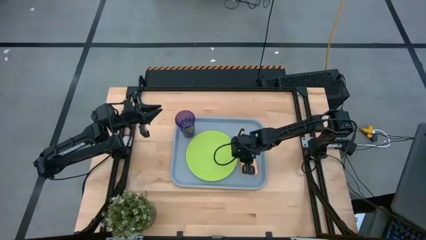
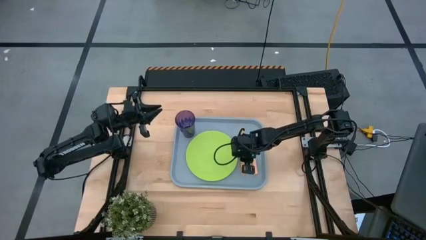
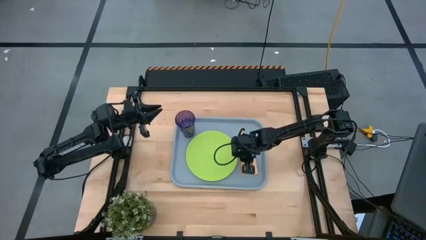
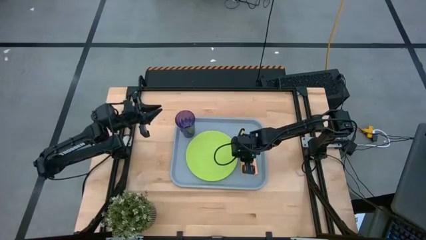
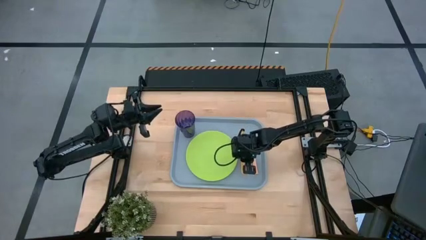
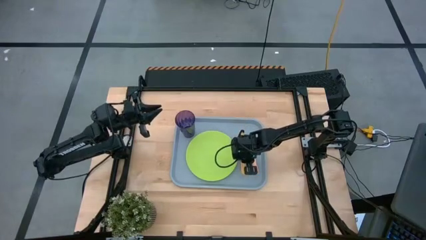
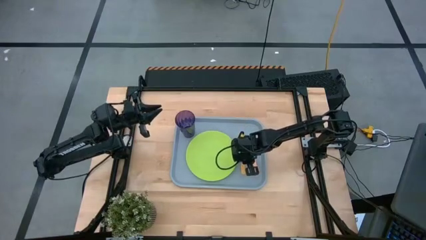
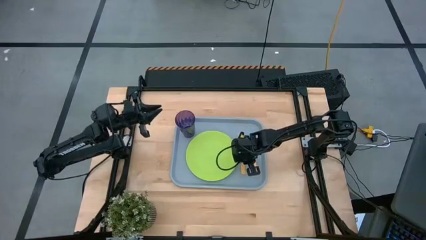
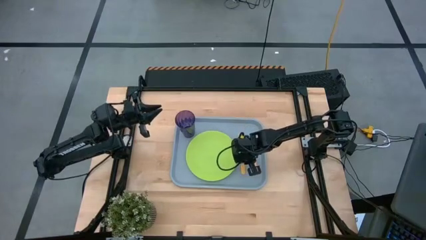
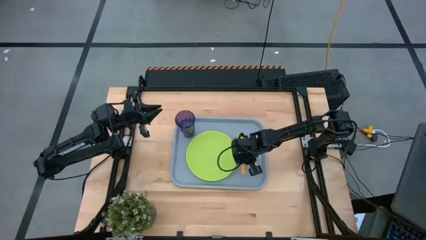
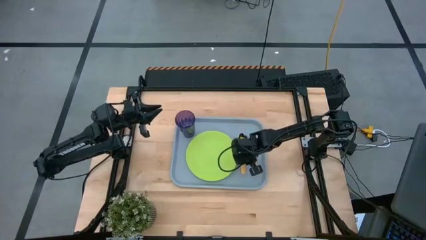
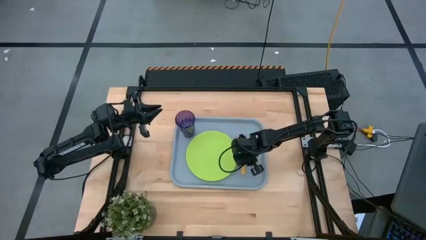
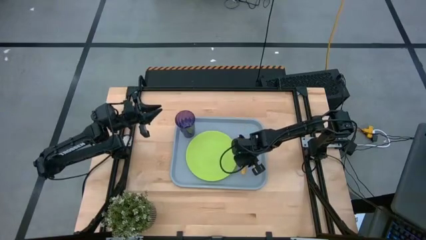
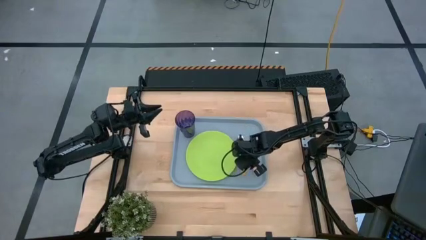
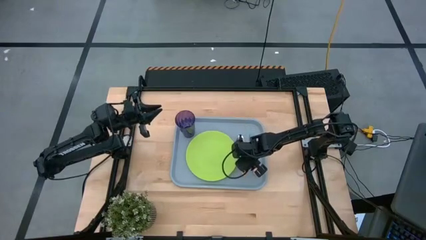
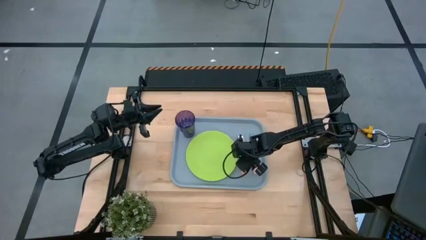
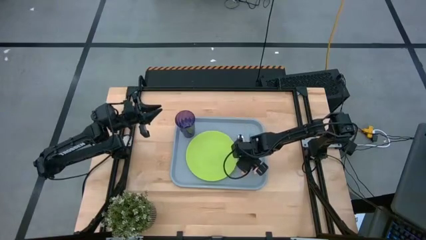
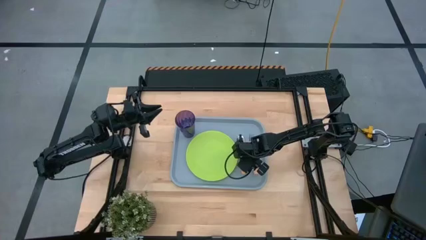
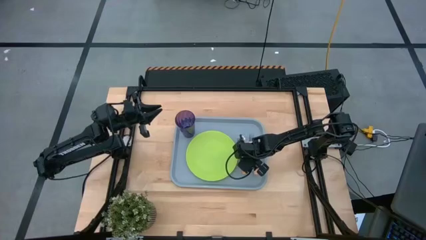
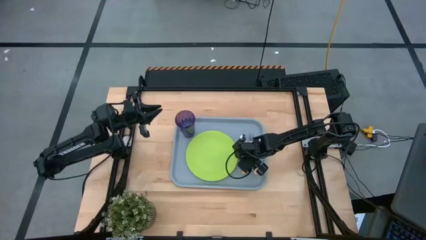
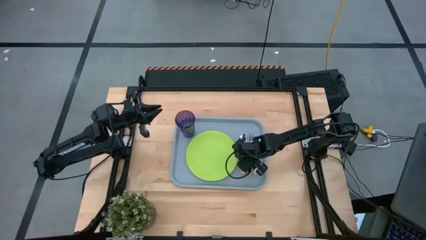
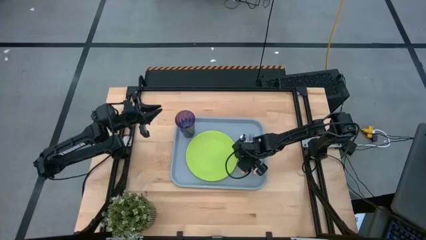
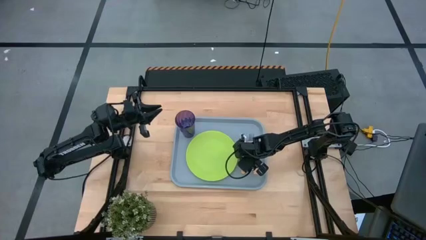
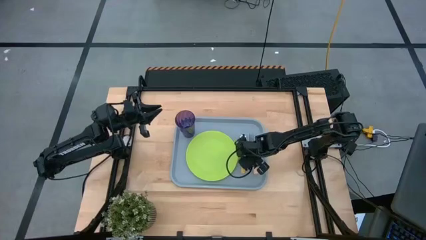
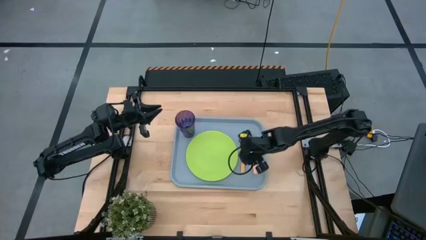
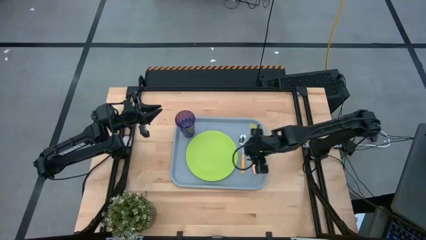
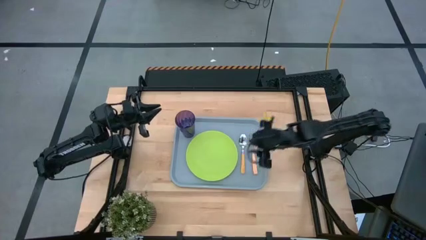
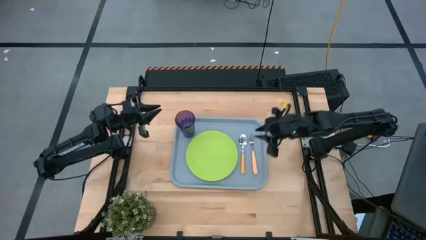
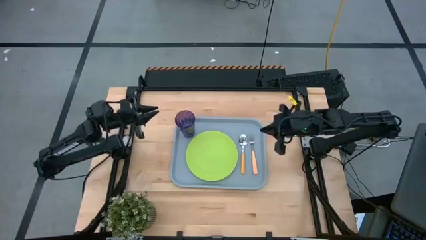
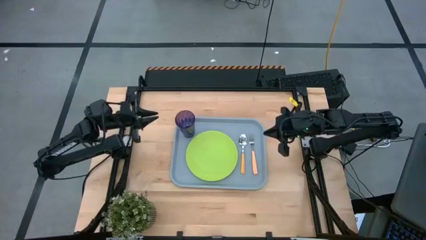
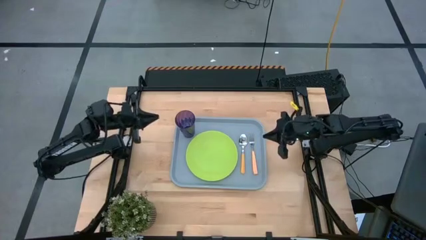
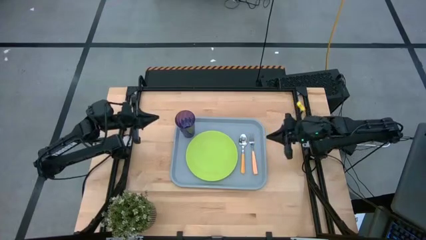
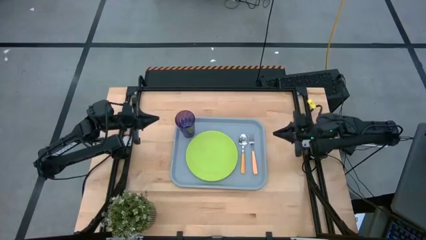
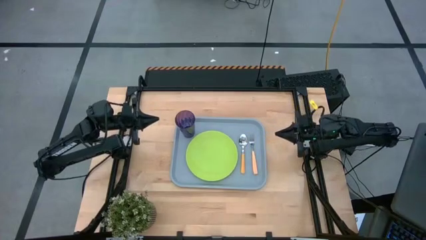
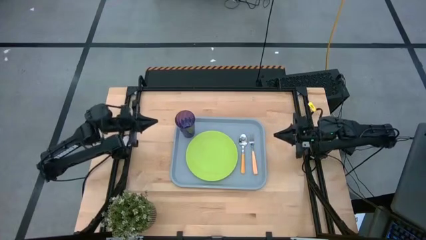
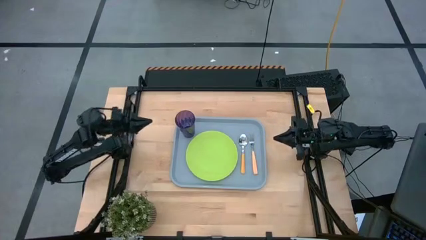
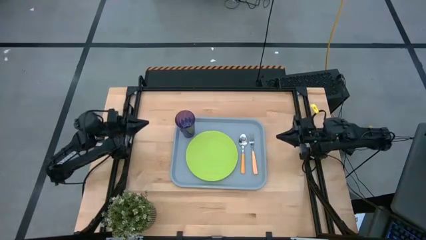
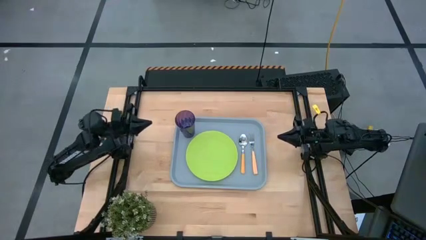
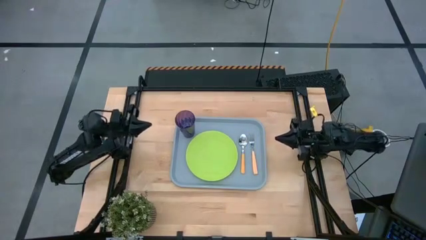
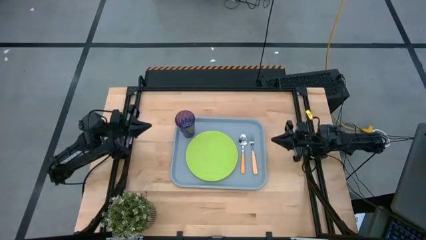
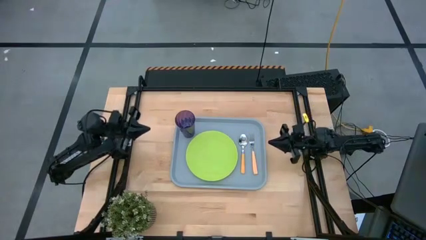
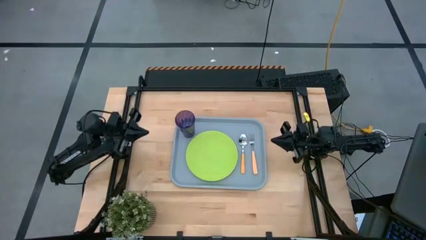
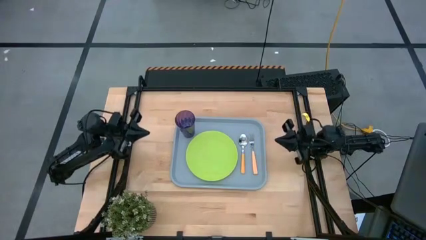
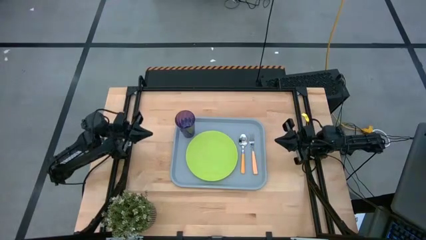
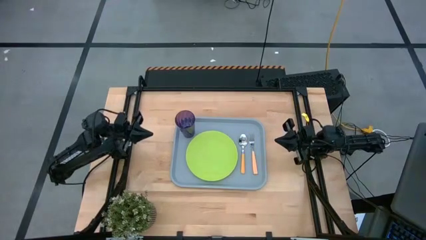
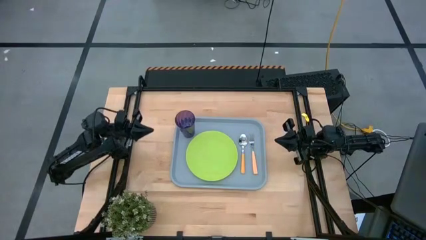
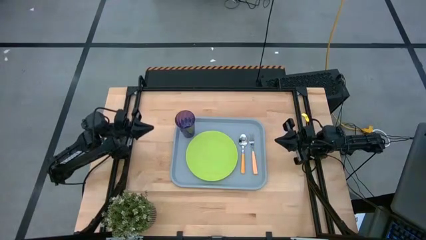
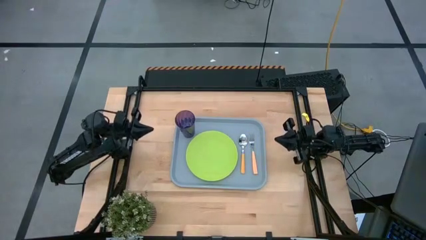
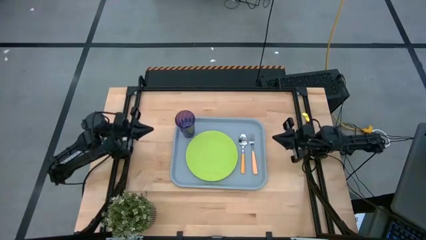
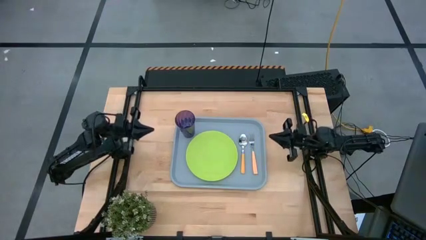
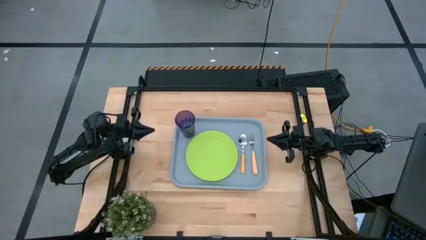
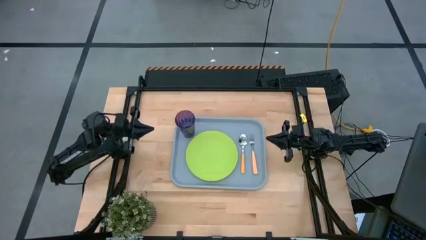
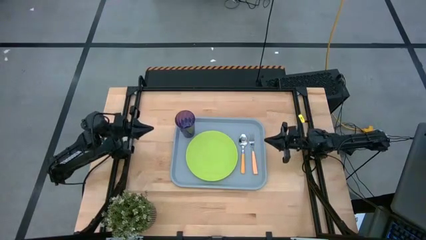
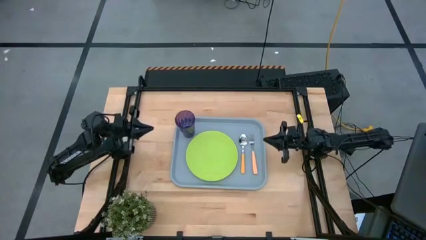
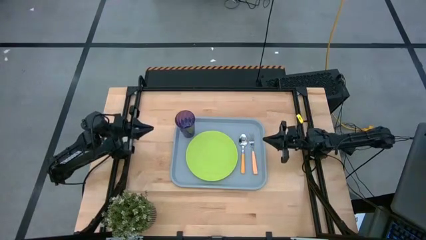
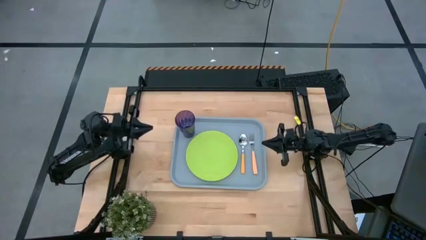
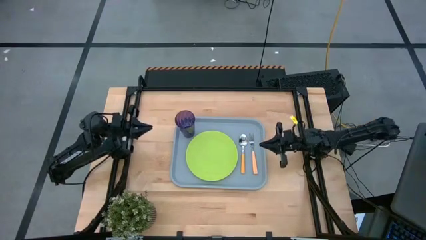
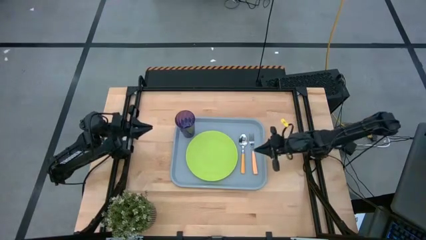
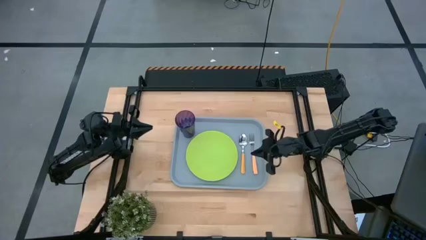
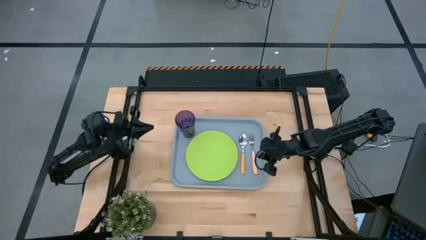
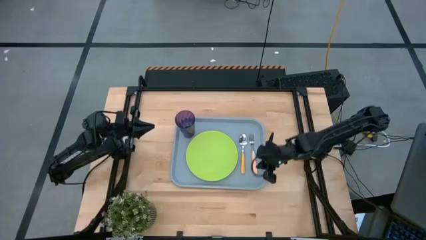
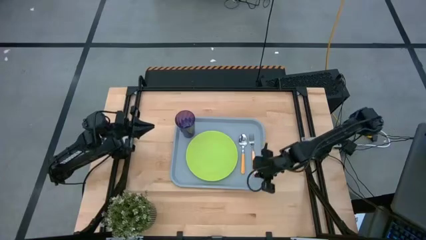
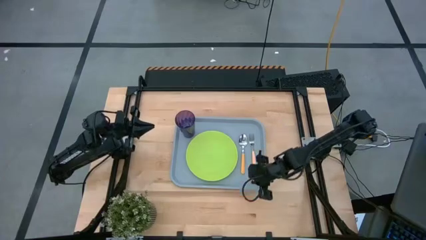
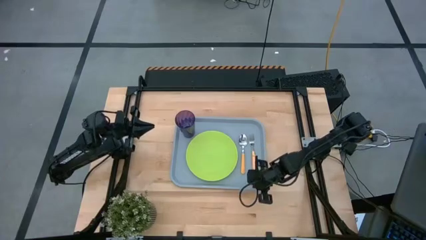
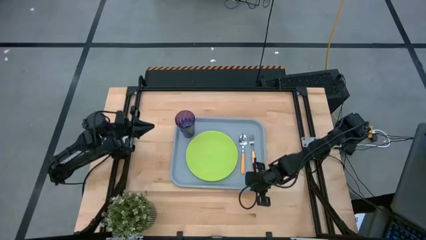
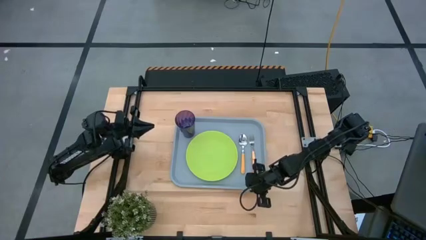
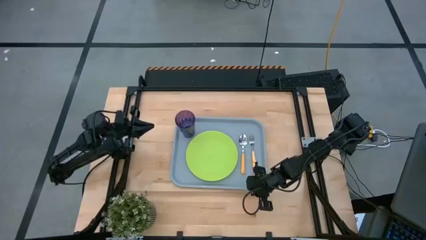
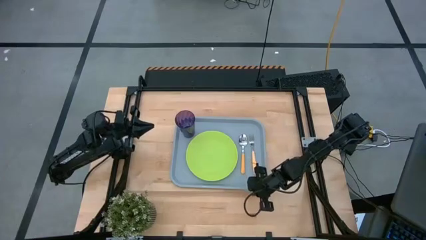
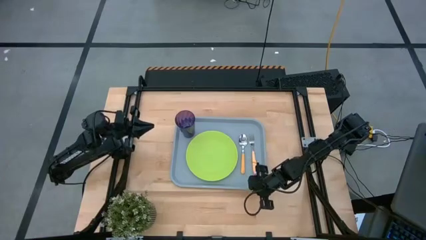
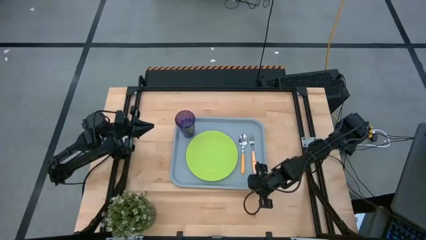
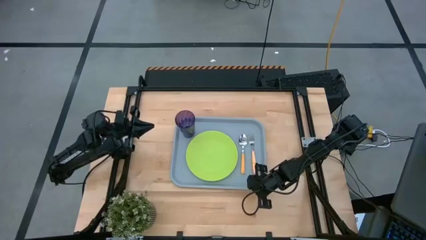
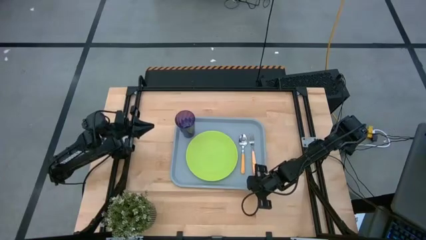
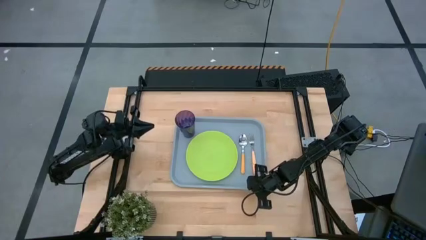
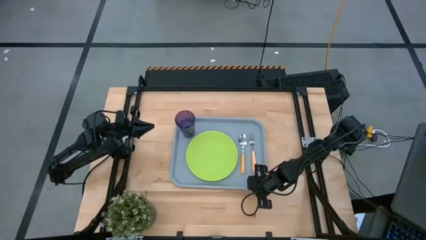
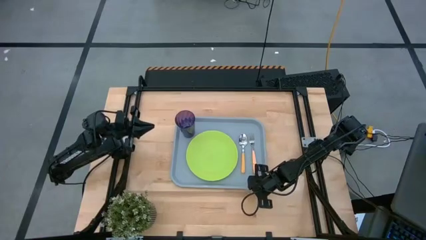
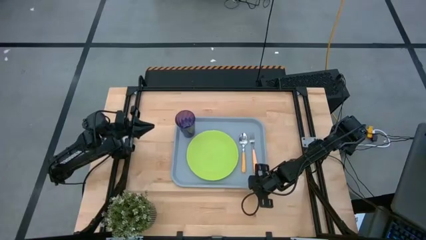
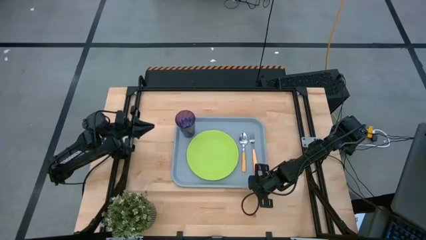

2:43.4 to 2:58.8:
Task: Pick and place plate/cup/fork/spoon on tray
Adjust the orange spoon and gray serving tray

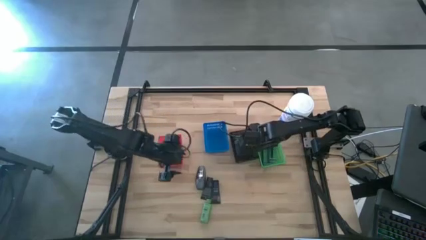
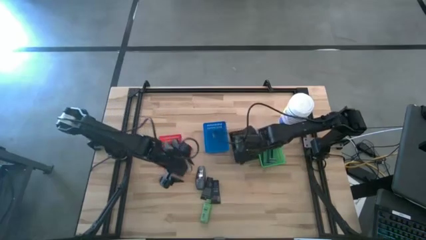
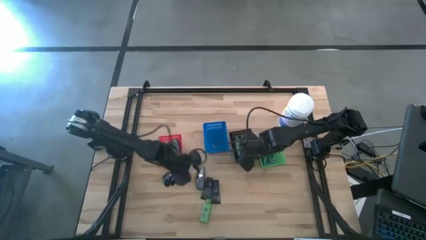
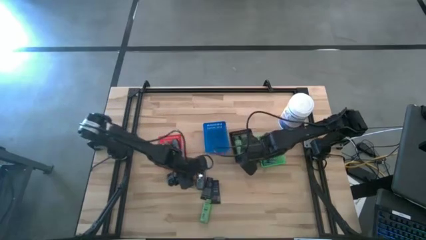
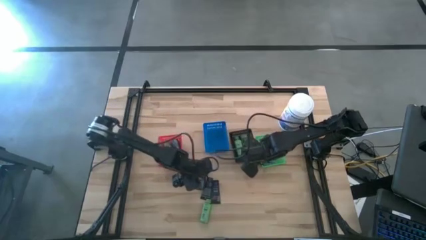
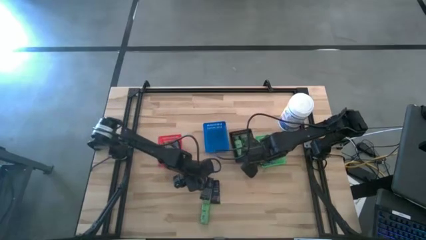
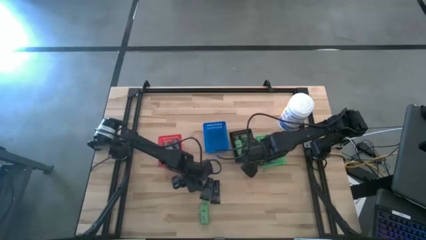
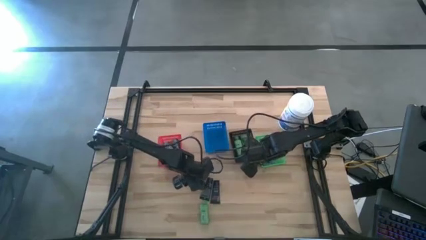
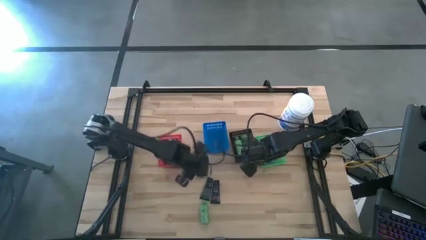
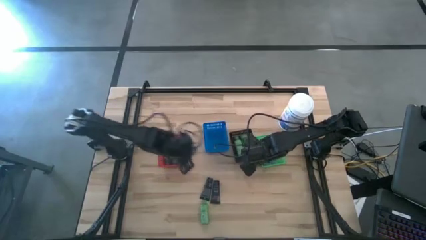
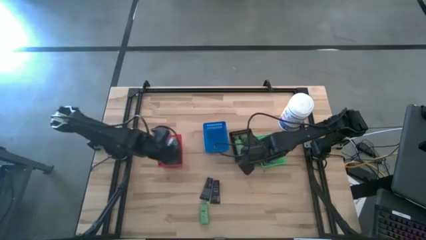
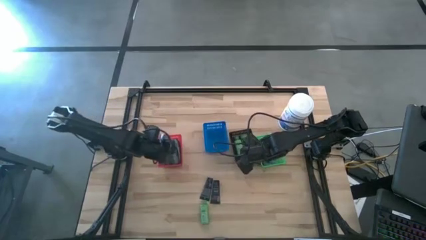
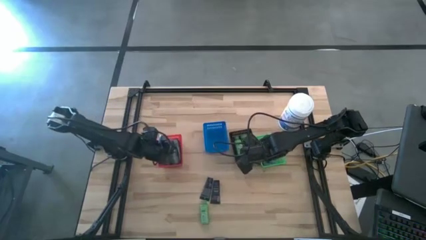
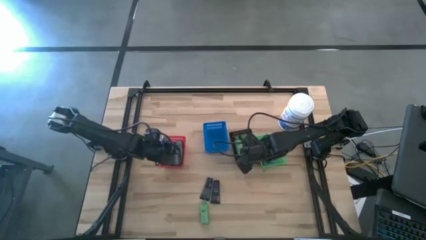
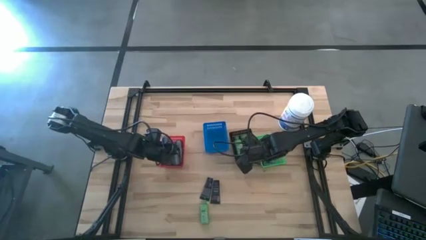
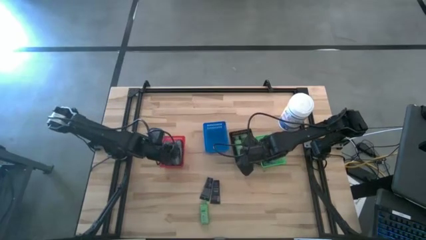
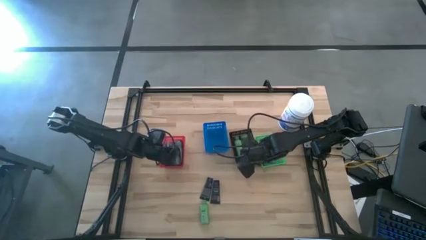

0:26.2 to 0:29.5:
Task: Pick & Place Travel size toiletries
Put the black deodorant into the orange bin
